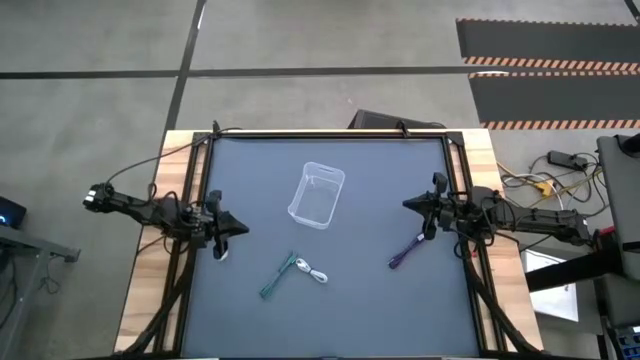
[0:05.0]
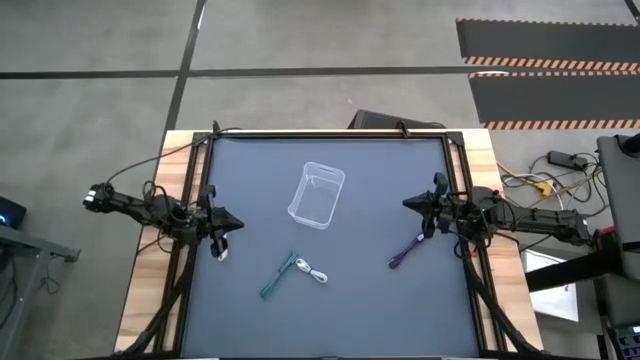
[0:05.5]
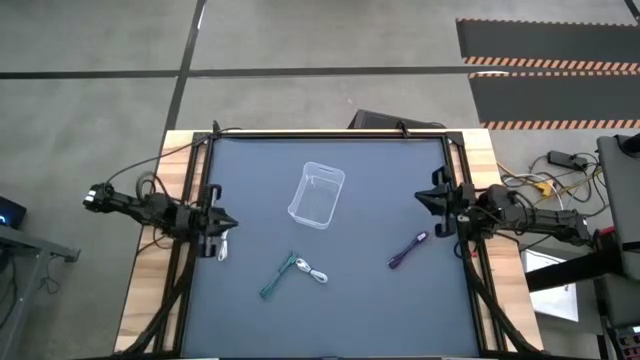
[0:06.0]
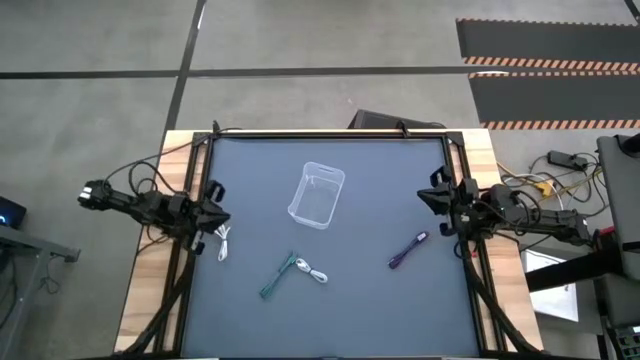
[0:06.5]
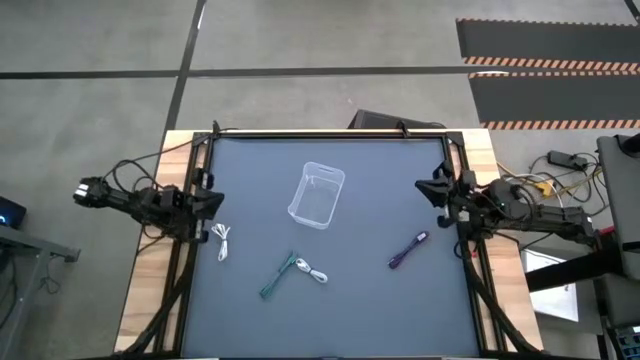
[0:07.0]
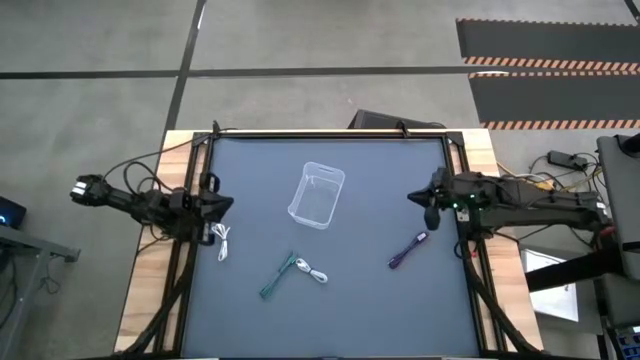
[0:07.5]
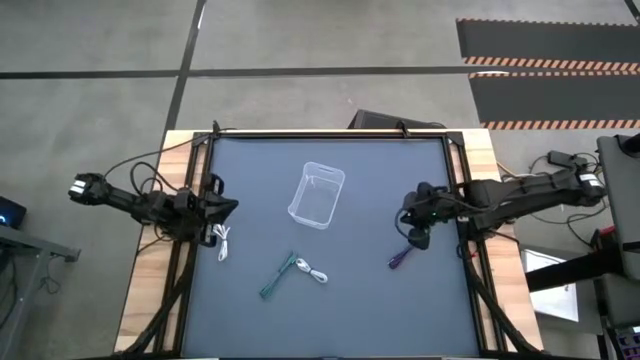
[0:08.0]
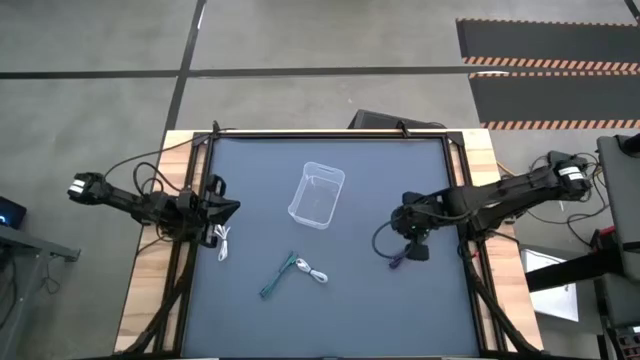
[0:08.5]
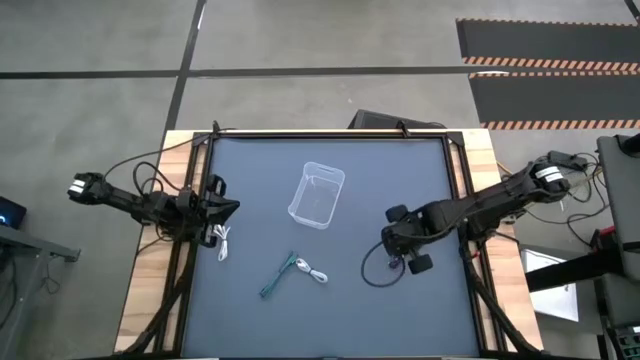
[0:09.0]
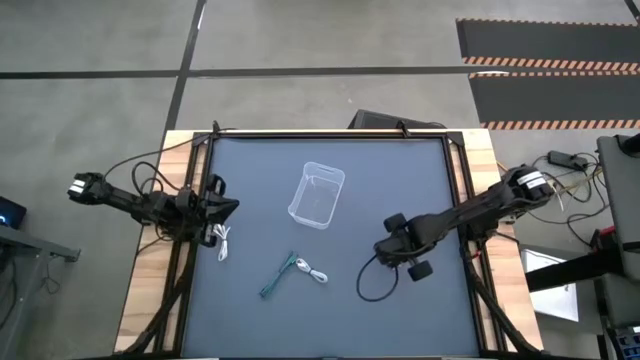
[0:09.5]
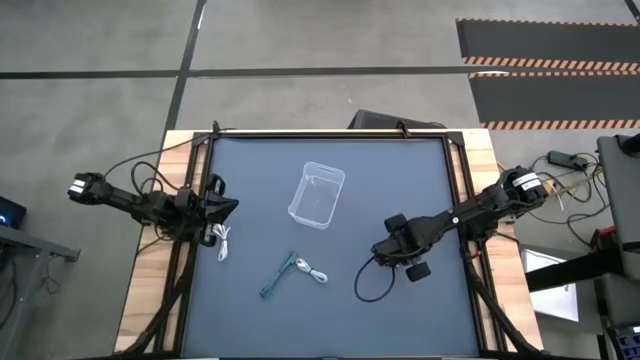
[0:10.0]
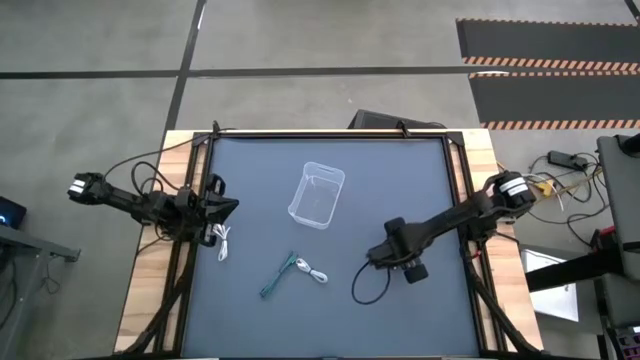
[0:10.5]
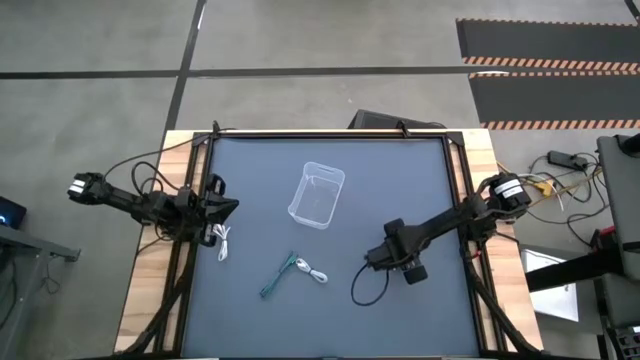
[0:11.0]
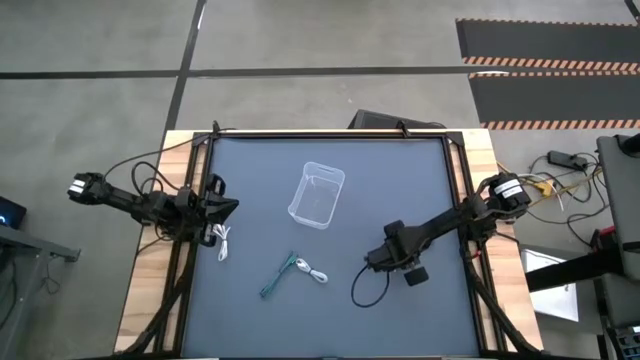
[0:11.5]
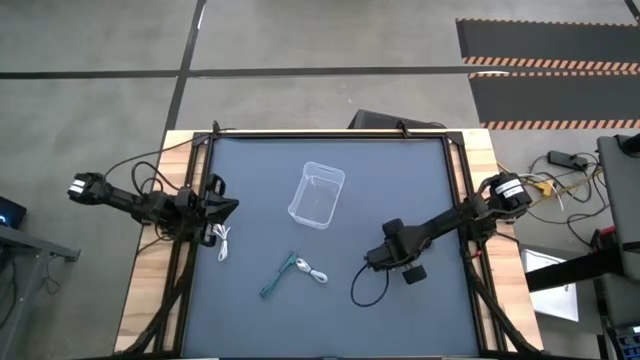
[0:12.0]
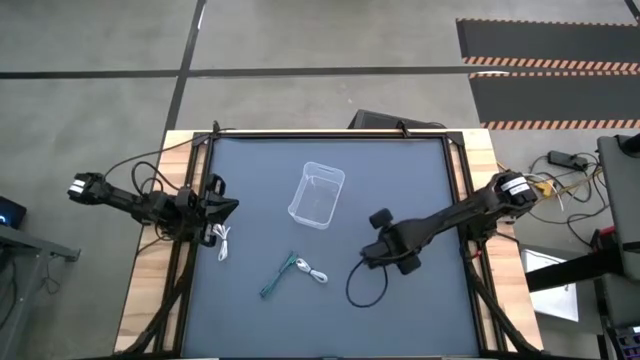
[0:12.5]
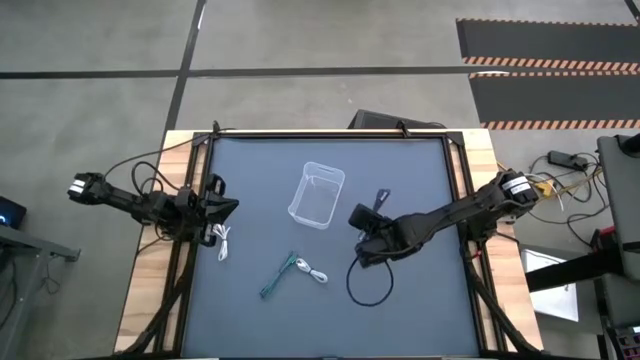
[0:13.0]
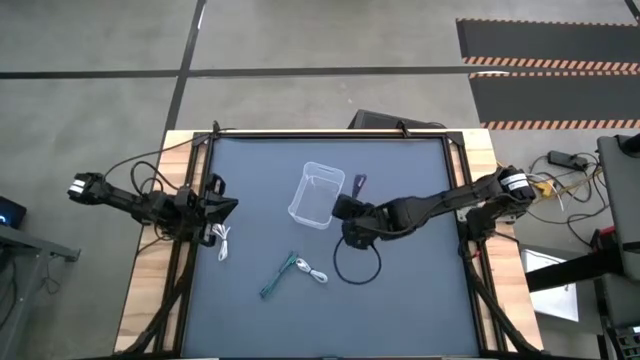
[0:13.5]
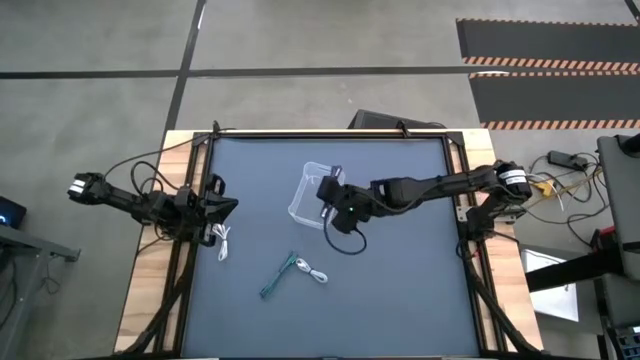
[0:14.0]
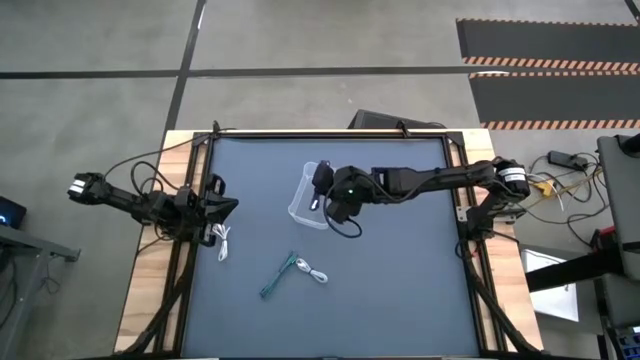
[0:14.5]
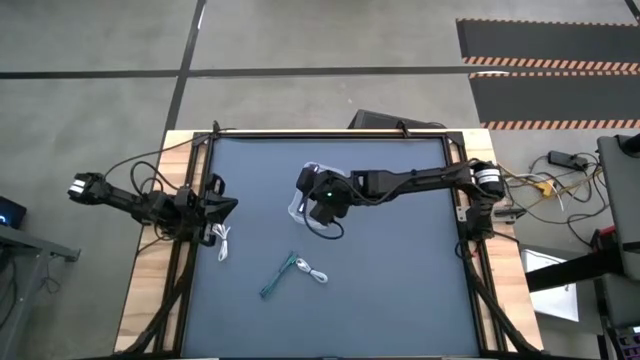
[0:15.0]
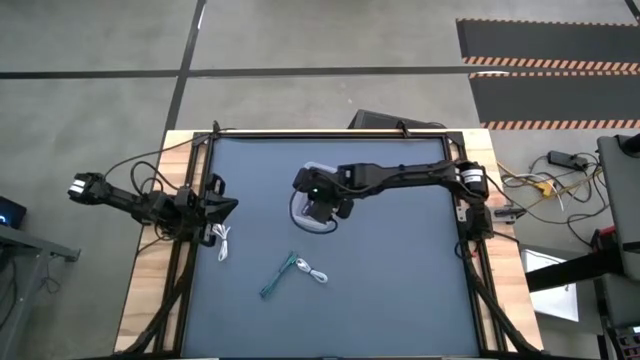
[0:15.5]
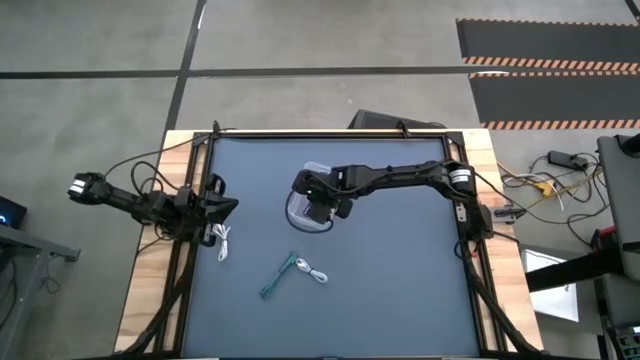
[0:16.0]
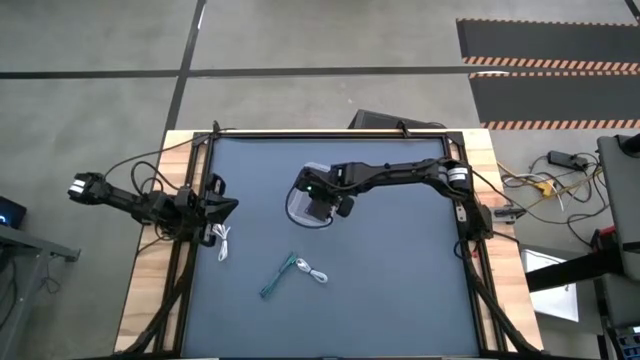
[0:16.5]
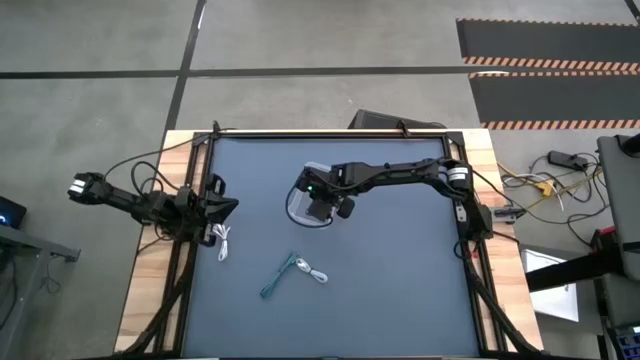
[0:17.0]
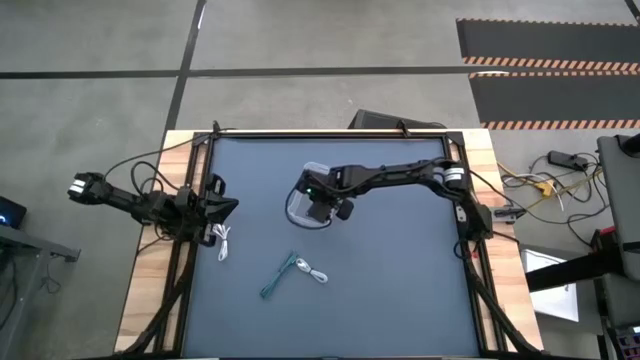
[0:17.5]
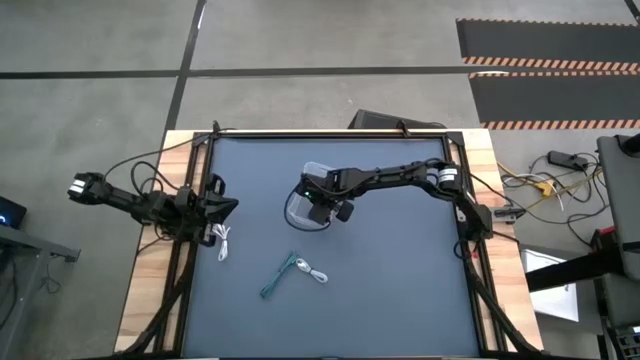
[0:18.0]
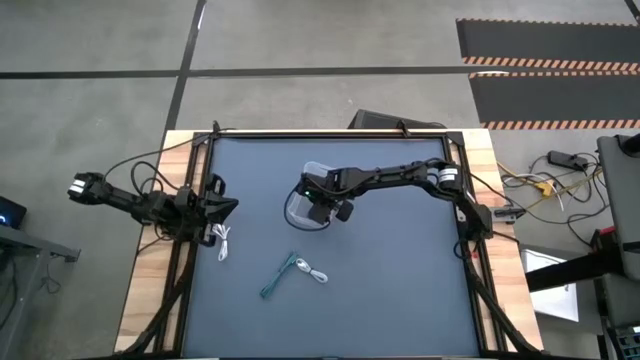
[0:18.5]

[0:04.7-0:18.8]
Task: Pick and place USB-C Cables
Put the purple USB cable into the transparent bin
